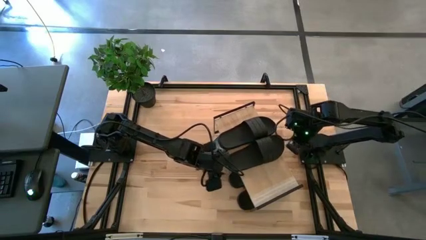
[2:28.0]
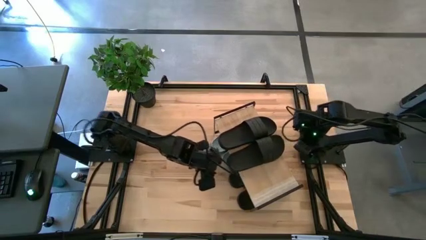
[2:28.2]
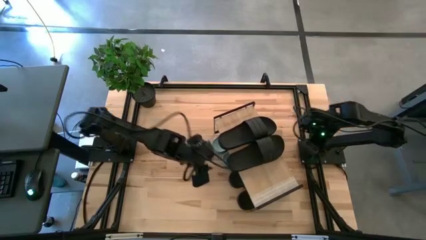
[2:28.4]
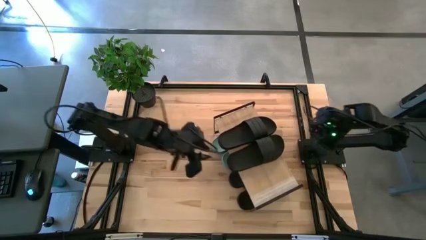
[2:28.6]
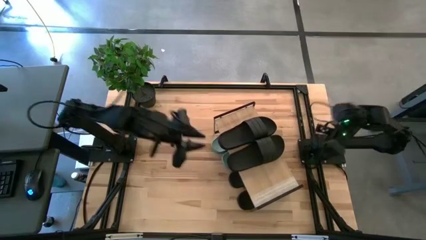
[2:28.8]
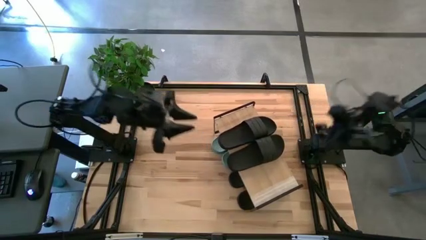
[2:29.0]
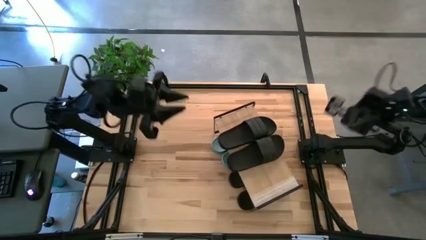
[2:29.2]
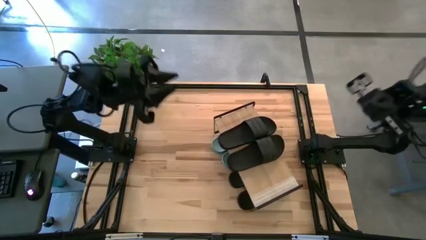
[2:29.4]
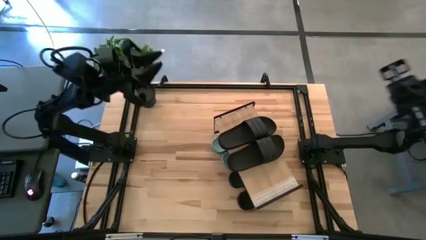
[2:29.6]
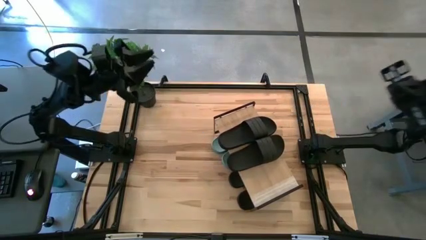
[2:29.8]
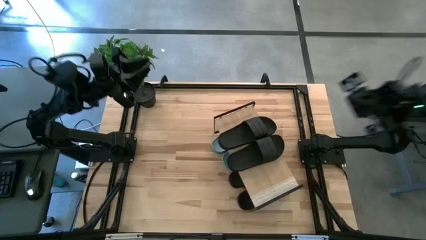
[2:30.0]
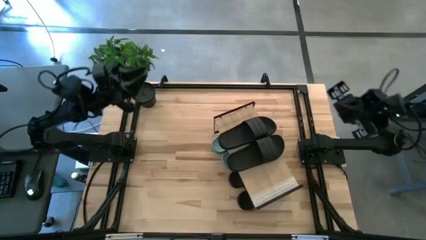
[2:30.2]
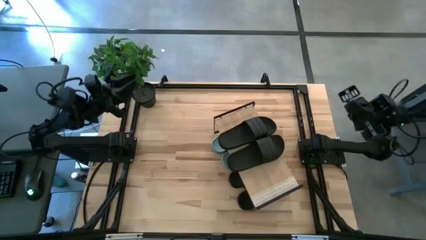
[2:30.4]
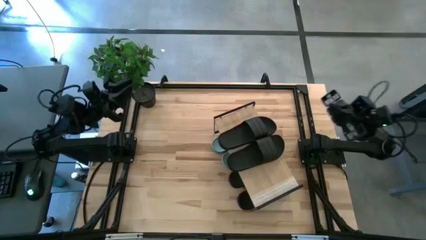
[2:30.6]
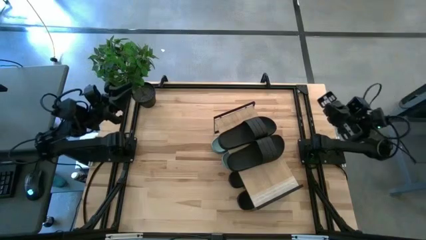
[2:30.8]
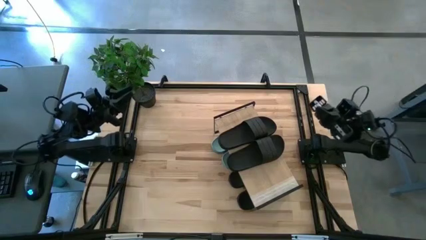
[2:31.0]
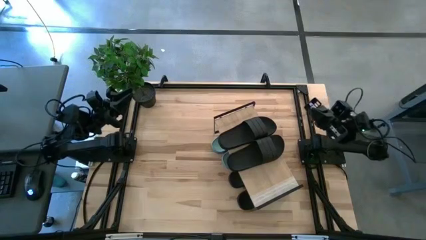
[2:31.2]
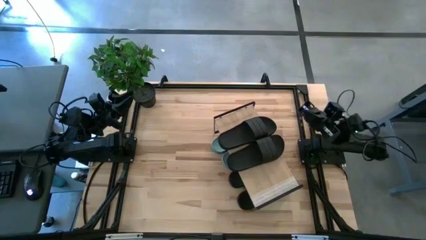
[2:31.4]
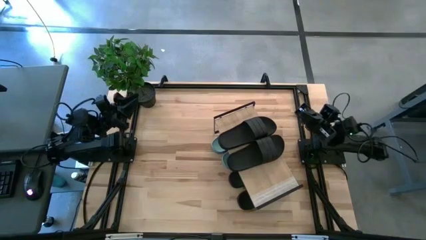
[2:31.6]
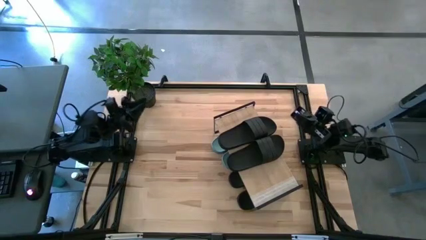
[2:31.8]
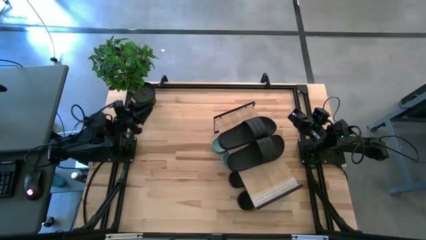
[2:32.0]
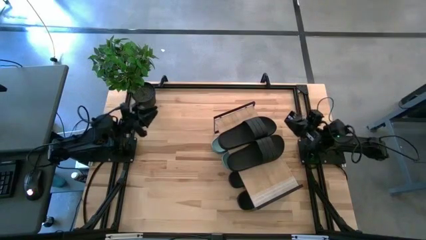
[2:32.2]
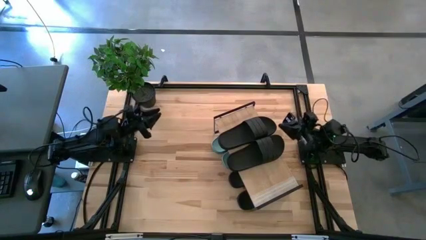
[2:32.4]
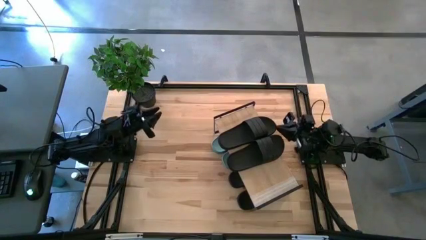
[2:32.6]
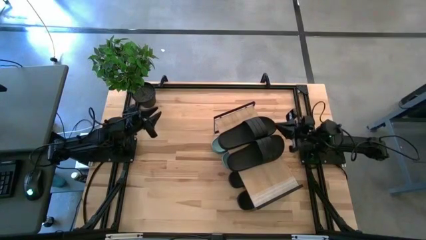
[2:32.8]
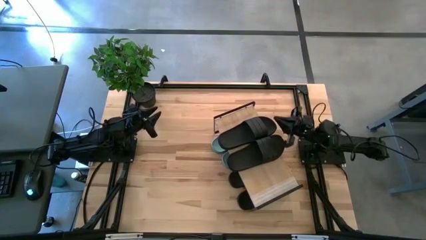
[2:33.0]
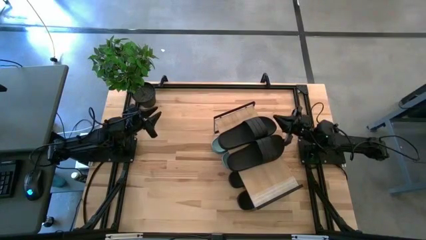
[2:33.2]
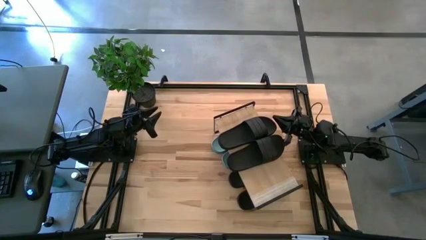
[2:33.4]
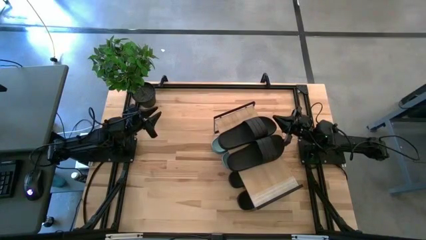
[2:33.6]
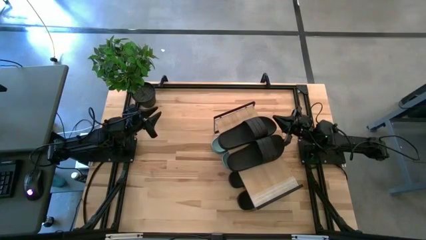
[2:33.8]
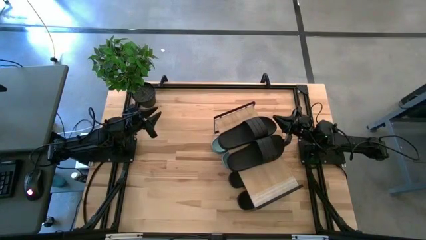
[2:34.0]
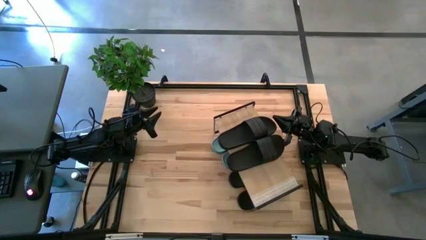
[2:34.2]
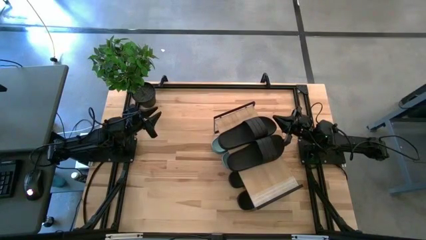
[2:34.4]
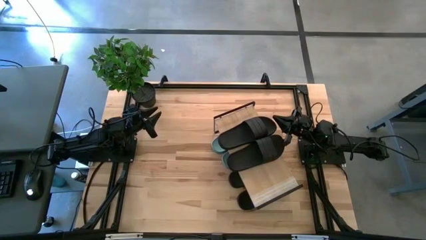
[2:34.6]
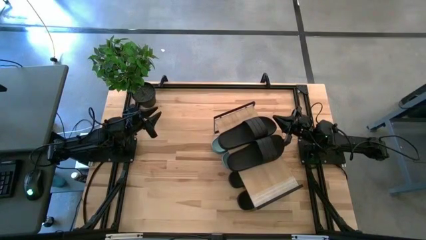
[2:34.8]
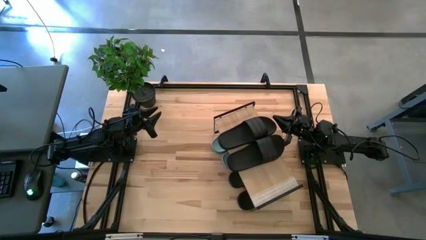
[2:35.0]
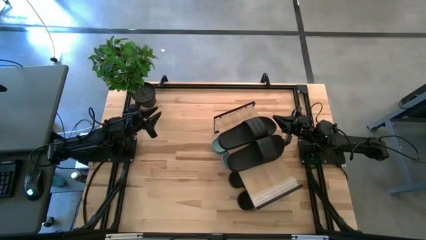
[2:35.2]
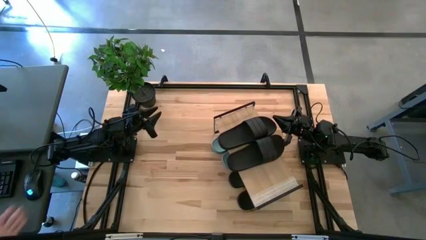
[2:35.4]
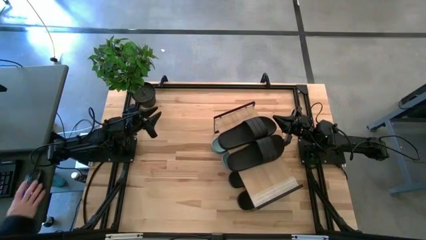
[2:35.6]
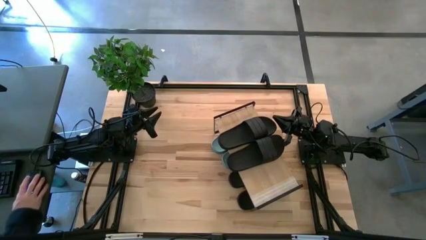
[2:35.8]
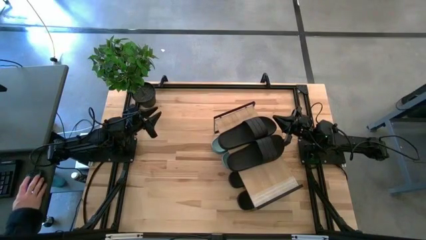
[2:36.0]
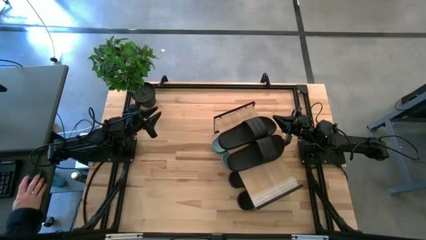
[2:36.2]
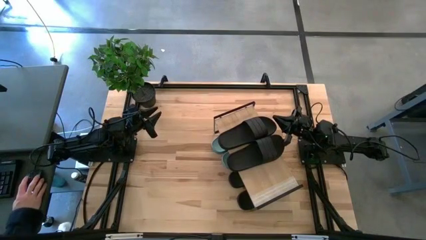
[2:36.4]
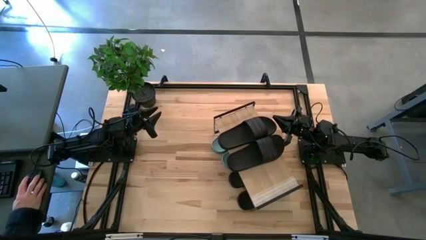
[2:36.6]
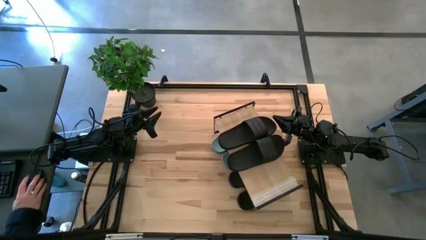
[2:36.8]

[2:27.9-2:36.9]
Task: Pick and place slides into the shelf
Return to Home Position

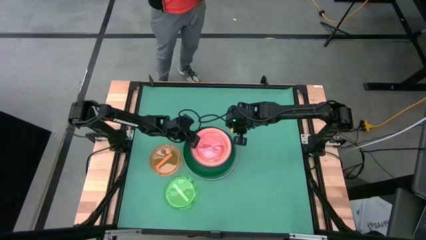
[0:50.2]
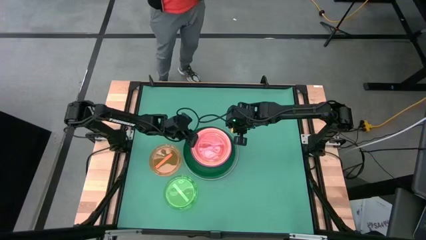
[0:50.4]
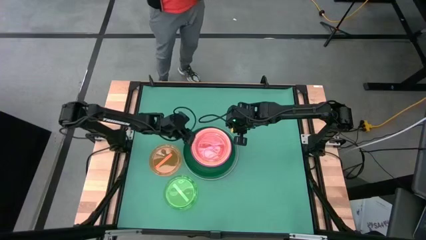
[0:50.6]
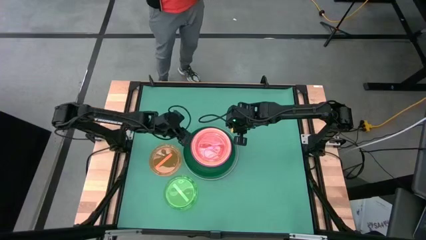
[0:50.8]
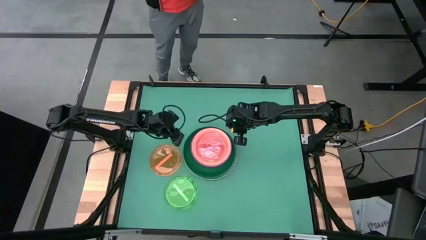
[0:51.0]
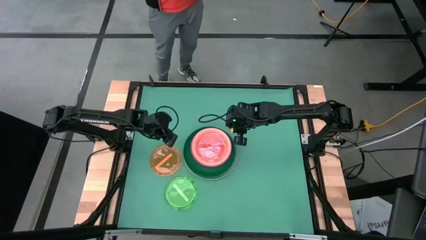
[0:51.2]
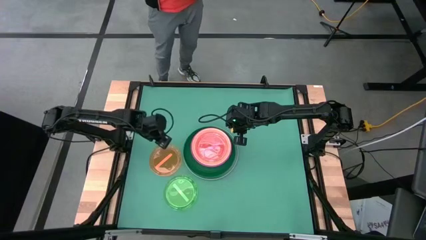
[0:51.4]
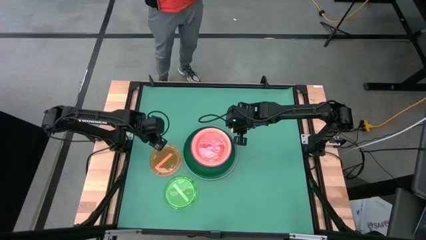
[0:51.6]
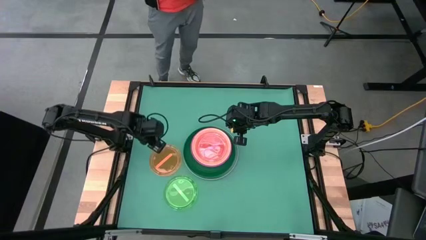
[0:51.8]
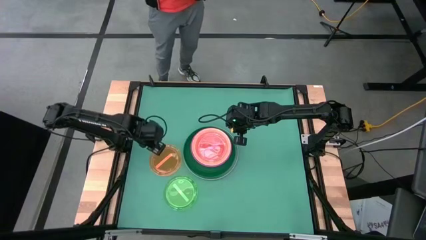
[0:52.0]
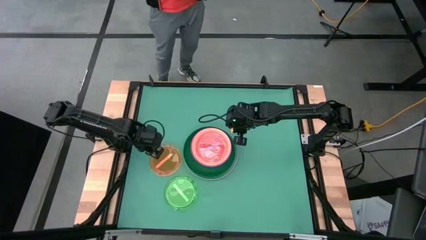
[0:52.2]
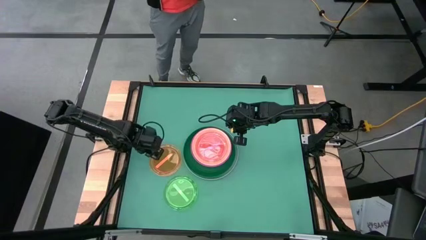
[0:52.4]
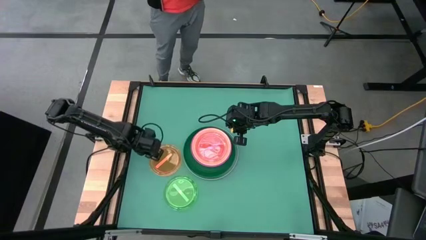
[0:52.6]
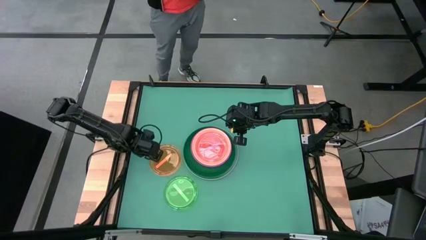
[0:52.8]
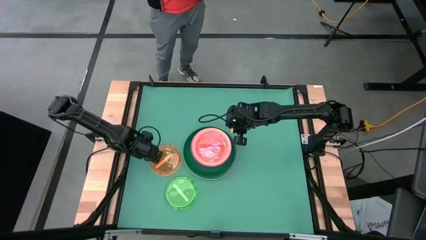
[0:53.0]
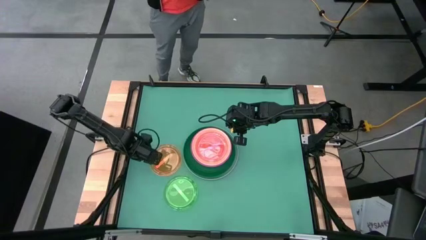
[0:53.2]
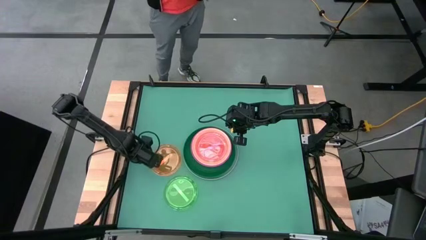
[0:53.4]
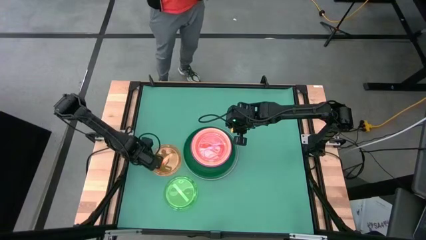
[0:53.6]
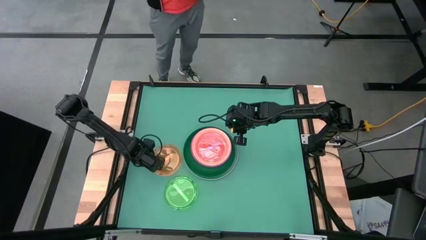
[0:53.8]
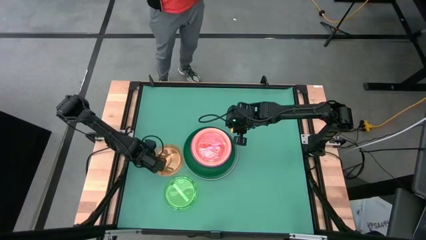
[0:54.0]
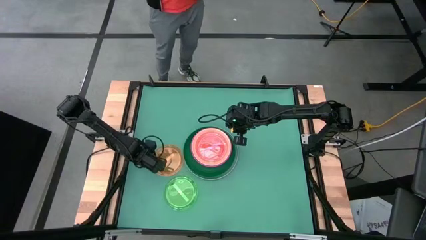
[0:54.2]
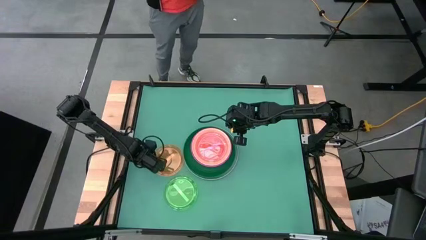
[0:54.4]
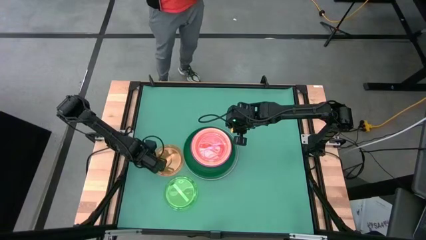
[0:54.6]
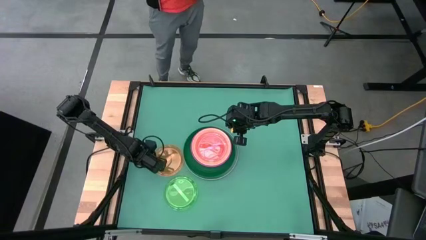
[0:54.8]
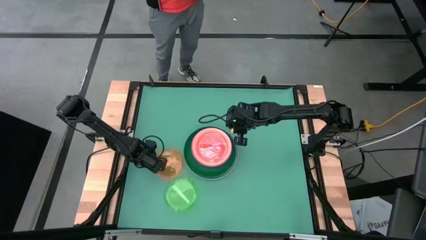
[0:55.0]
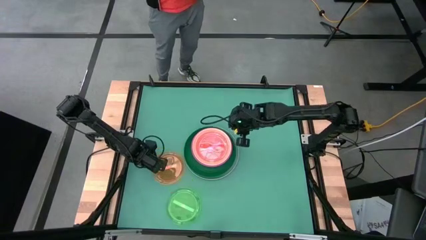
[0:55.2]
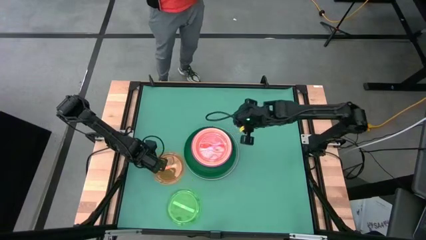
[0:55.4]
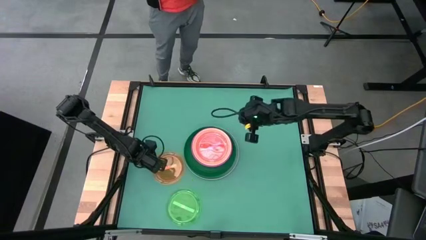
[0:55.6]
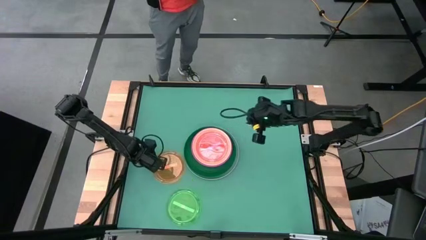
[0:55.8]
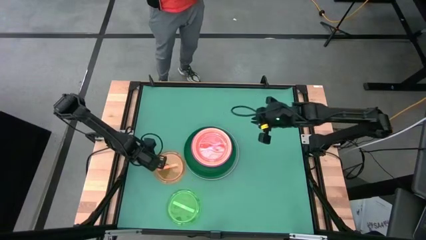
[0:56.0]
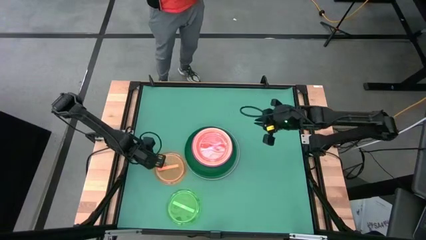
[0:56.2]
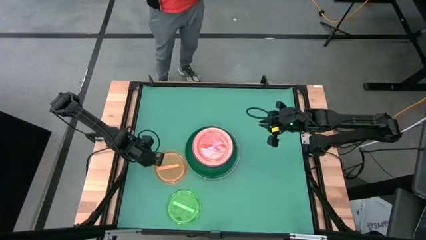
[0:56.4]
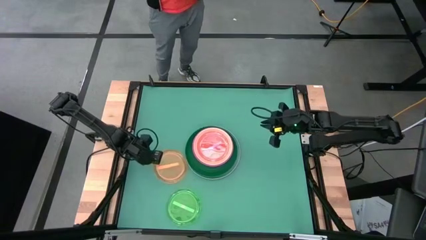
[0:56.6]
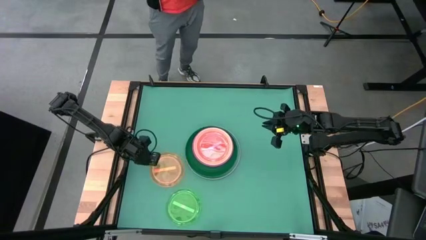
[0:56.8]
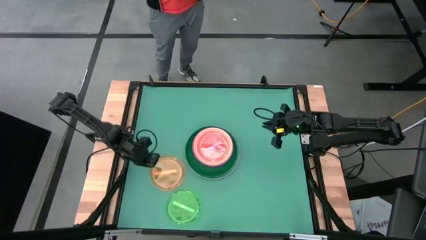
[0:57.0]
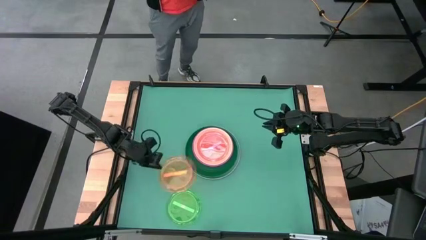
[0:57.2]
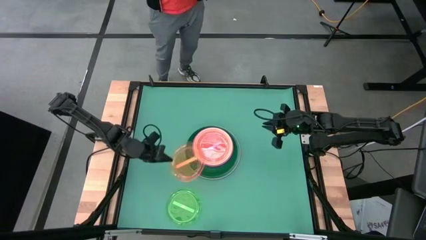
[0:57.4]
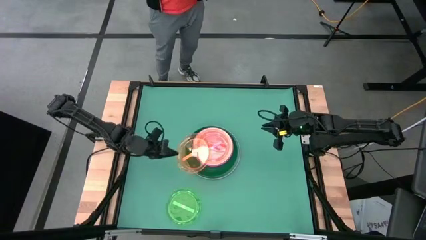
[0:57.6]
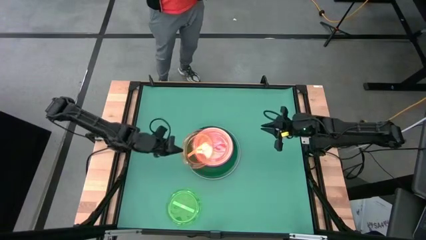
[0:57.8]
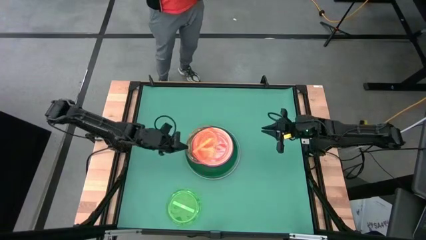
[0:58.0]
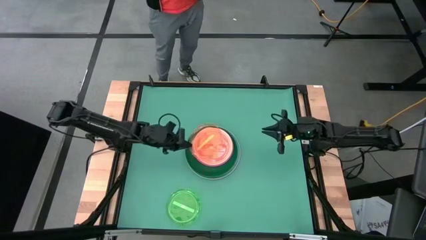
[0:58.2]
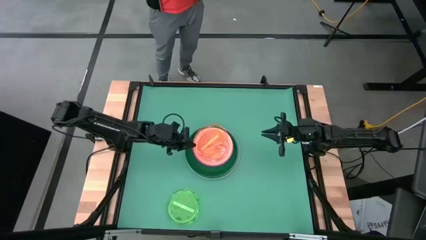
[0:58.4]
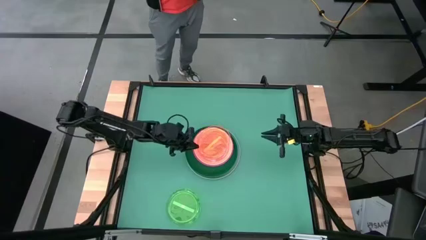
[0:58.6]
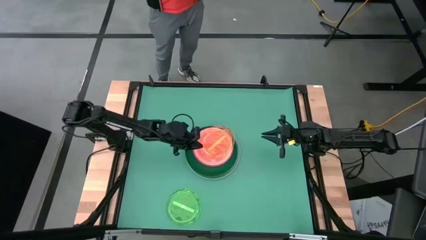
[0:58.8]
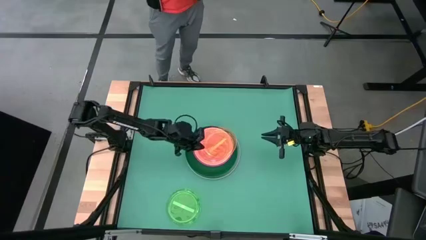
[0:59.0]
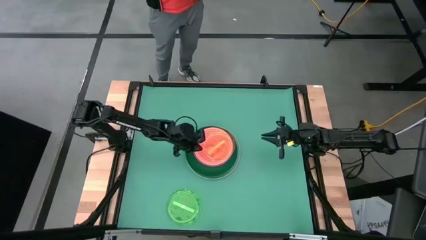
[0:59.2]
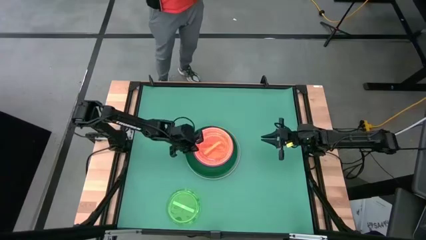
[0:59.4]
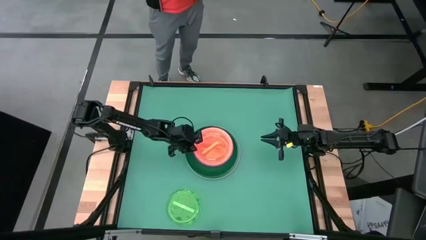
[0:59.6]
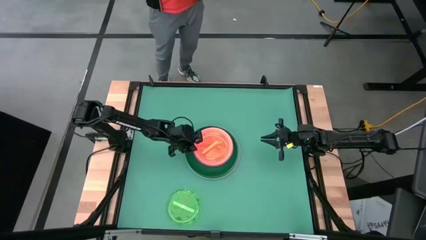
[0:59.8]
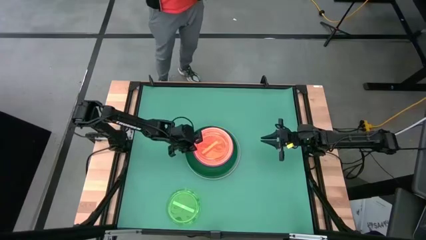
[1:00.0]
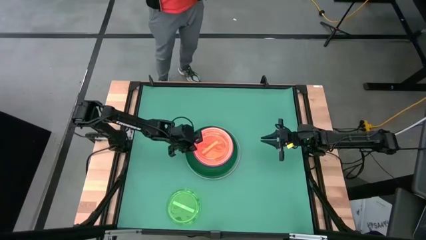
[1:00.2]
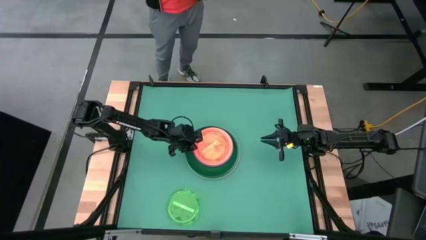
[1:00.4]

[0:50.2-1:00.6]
Task: Stack plastic plates
Stack the transparent orange plate on top of the transparent pink plate
